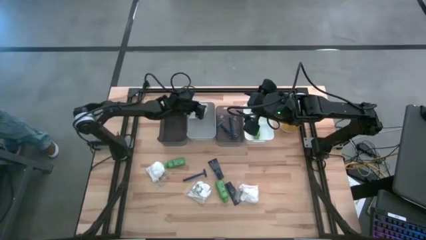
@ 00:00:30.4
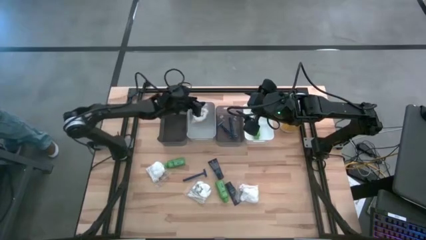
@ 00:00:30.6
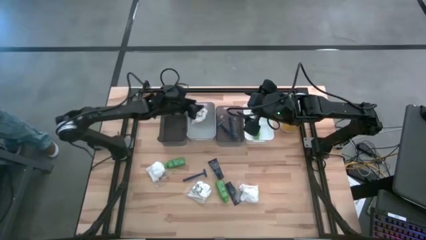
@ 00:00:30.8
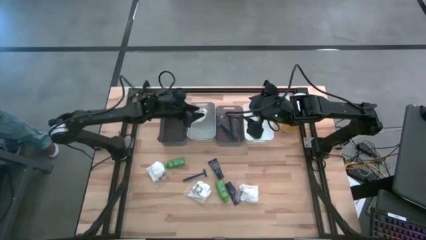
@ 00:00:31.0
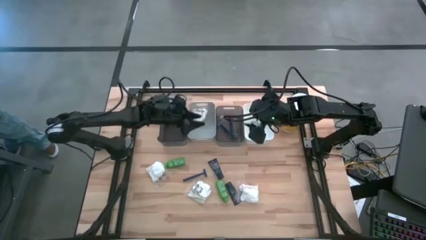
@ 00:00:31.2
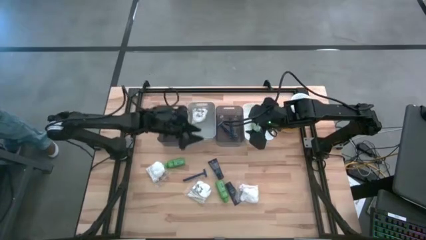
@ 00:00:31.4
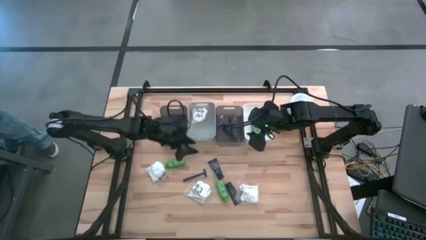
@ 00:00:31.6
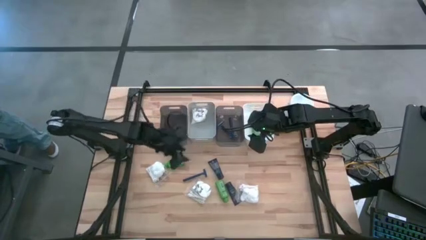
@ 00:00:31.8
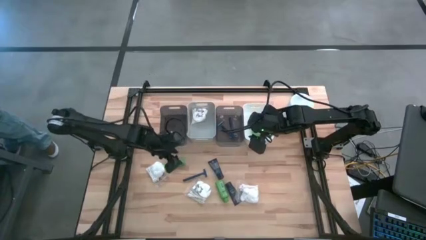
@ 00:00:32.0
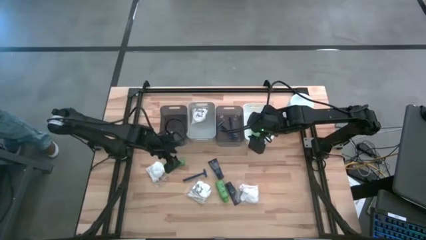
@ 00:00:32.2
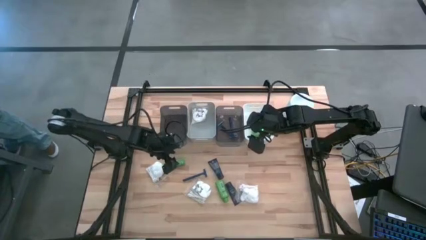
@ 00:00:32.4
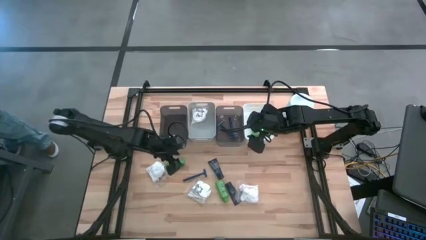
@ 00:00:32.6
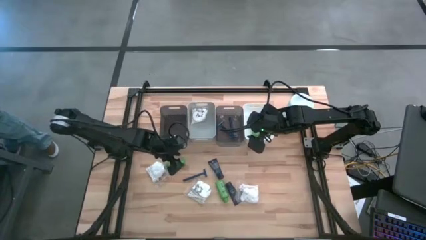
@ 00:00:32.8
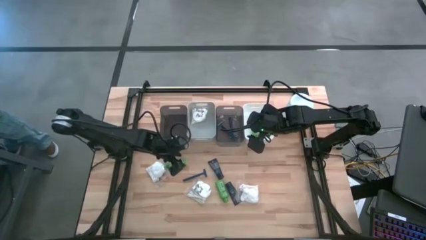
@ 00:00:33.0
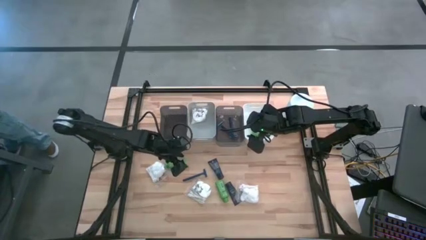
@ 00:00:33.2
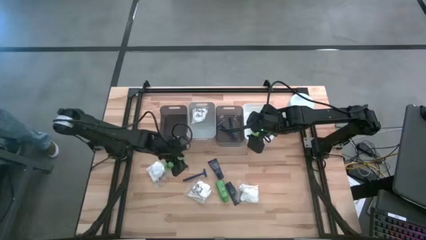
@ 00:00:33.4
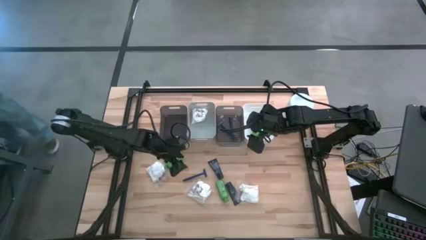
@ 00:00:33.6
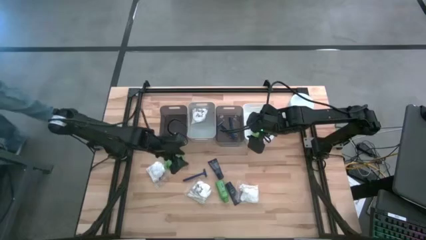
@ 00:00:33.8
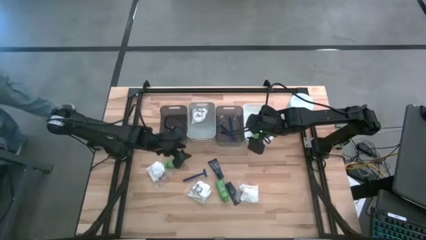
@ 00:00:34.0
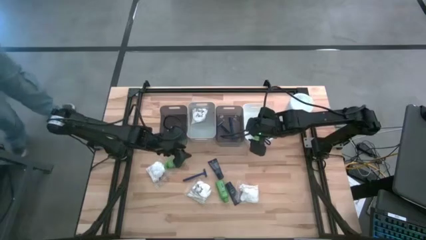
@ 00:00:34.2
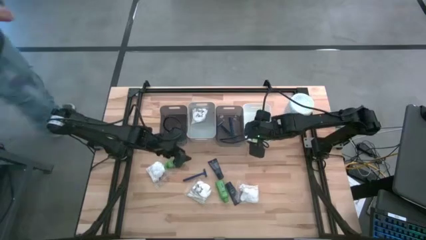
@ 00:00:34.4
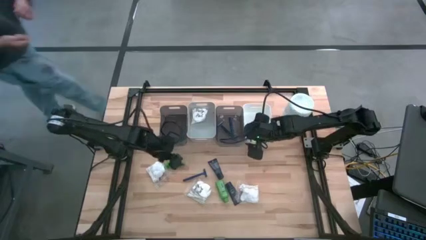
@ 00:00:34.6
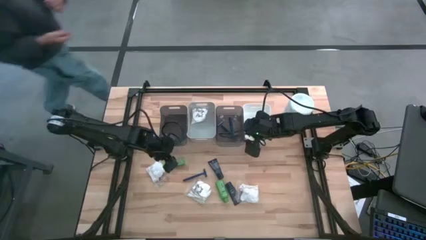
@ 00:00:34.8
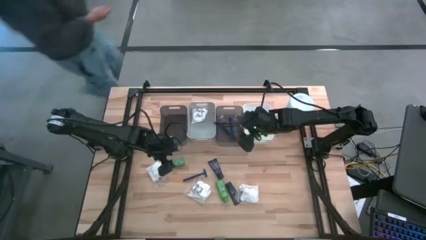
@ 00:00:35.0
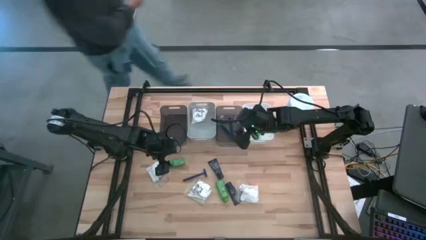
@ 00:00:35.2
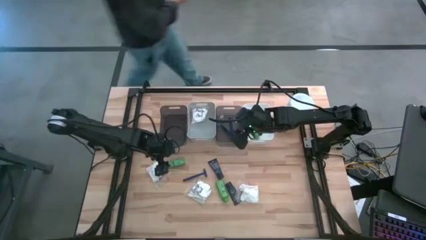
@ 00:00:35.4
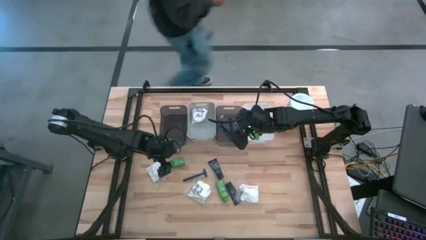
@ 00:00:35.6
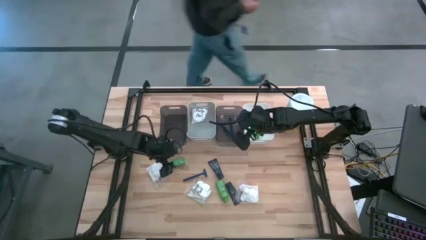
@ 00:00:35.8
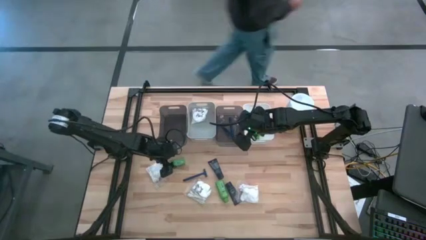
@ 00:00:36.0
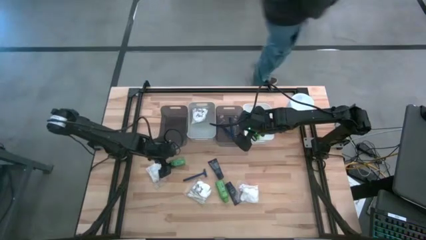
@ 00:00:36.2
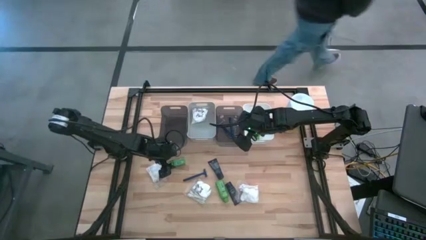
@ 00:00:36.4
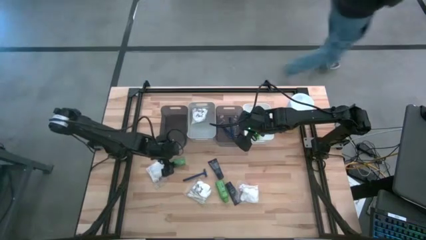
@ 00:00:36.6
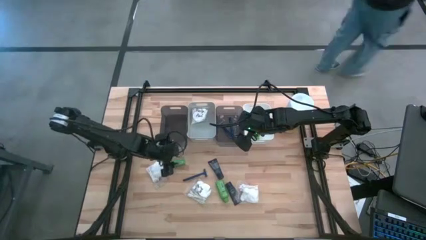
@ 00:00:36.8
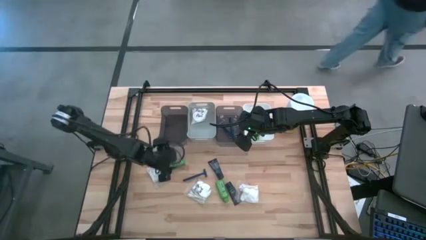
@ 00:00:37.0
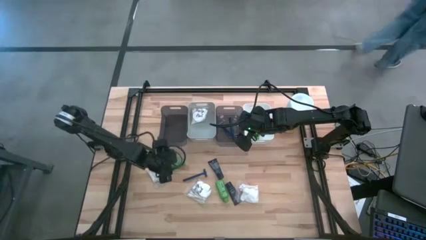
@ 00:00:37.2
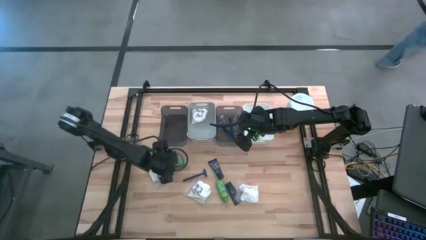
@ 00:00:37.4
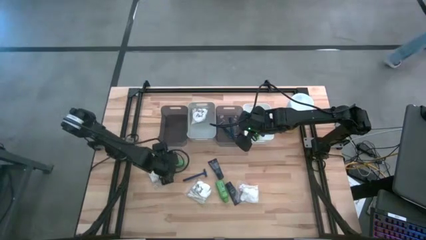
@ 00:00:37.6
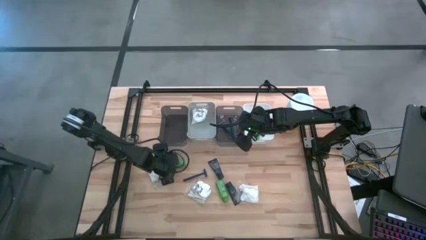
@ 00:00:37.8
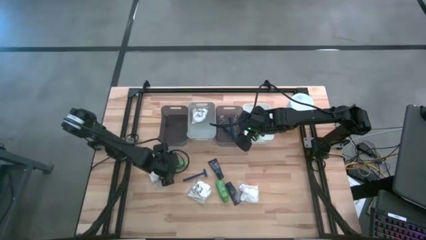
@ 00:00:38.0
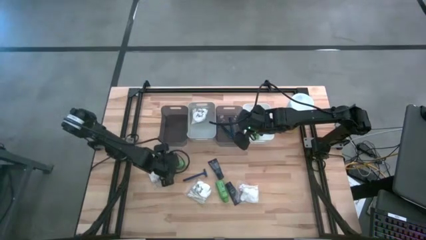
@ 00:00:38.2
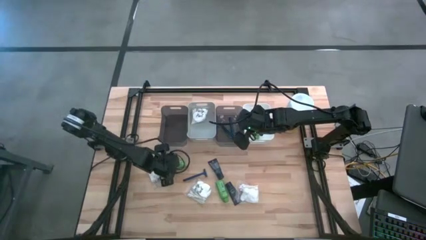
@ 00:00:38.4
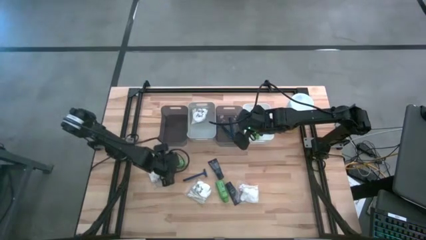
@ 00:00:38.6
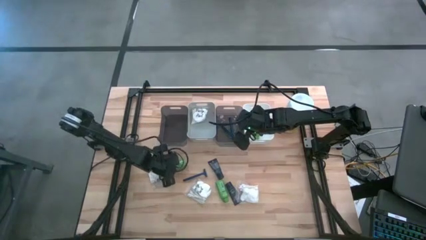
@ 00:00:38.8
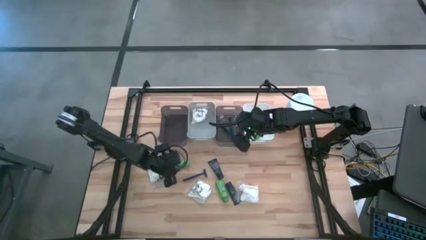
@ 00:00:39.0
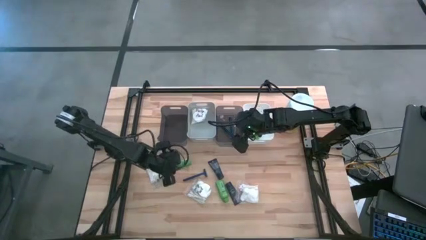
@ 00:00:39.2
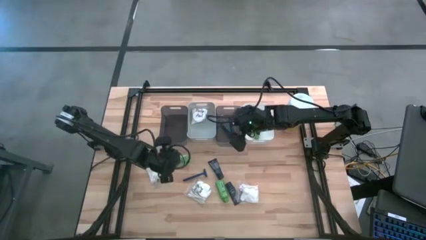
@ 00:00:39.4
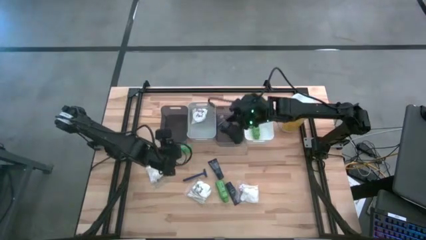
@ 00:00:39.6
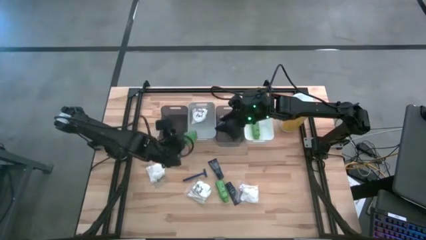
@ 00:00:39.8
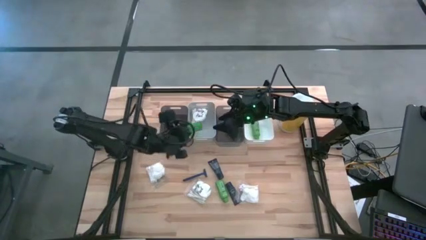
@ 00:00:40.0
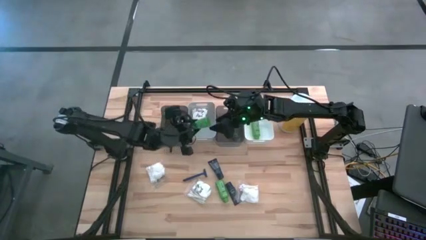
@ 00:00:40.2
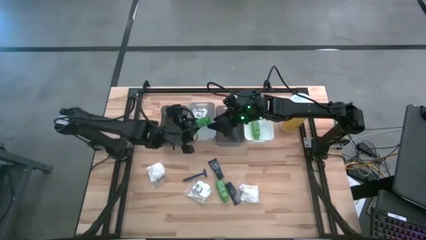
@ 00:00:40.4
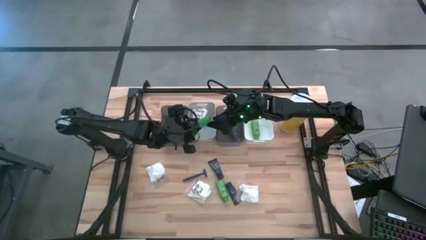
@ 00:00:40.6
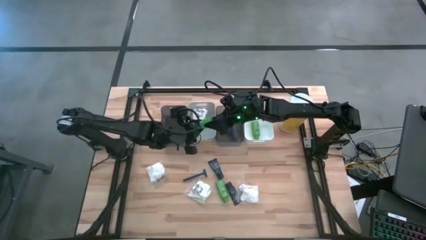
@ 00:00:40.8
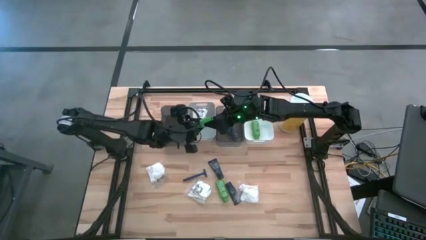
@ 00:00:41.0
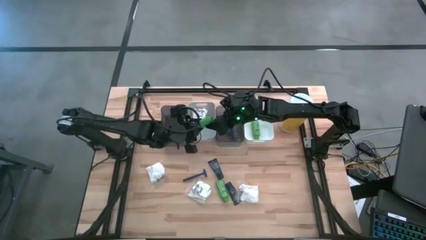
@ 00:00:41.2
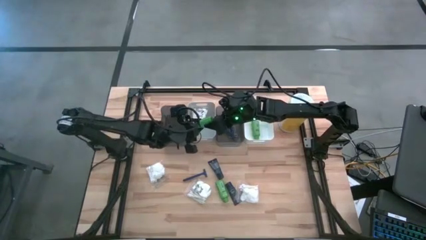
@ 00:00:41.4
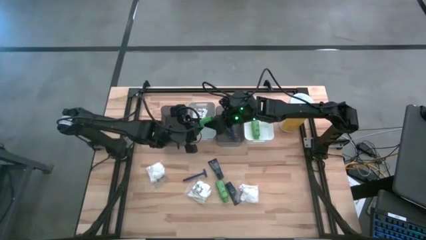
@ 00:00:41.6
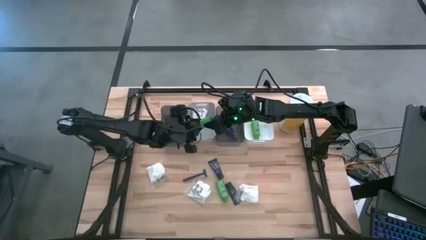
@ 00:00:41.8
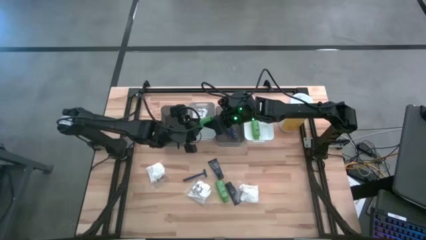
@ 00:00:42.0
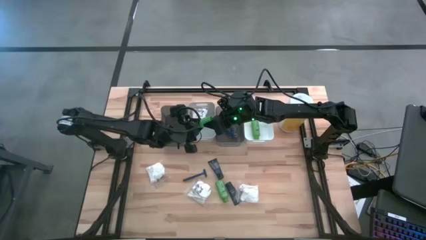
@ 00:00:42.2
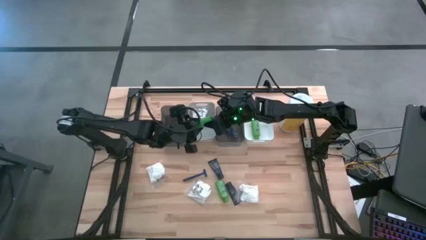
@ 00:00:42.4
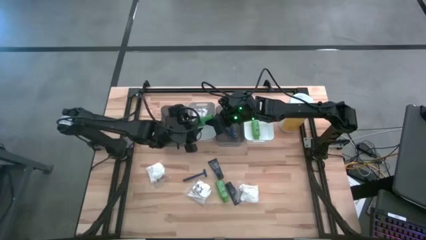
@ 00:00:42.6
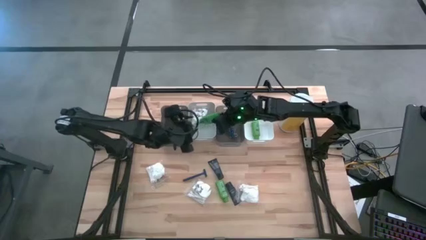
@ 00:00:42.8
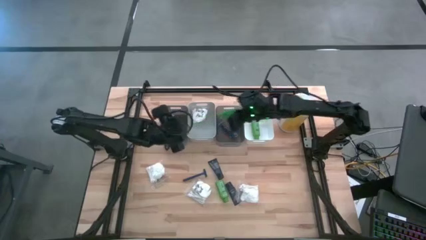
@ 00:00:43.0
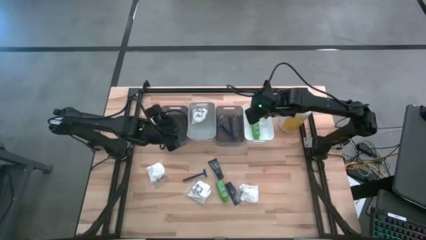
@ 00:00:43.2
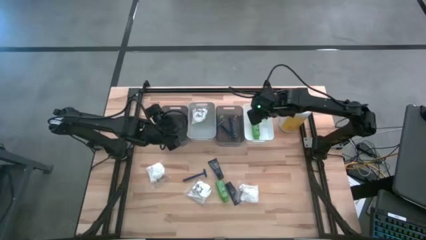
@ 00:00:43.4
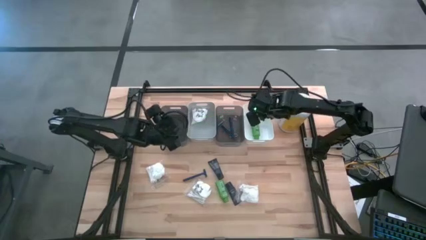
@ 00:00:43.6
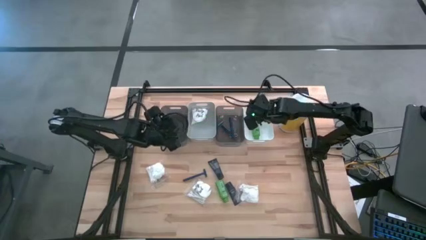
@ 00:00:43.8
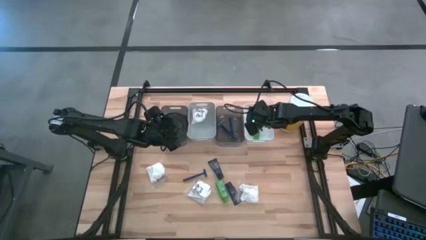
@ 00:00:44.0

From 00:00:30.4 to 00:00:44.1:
Task: Pick & Place Travel size toiletries
Put the green shampoo bottle into the white bin
